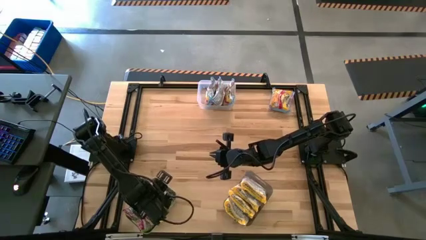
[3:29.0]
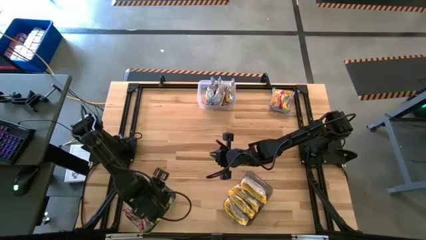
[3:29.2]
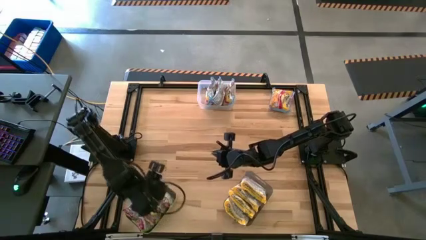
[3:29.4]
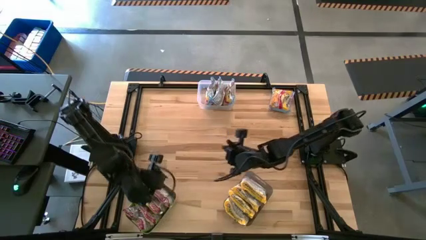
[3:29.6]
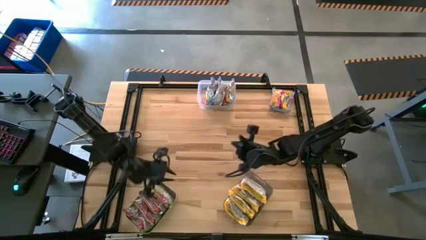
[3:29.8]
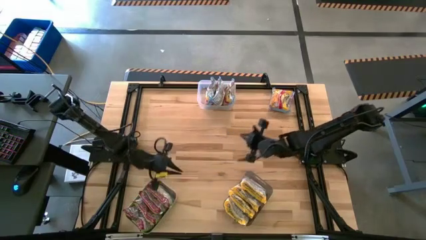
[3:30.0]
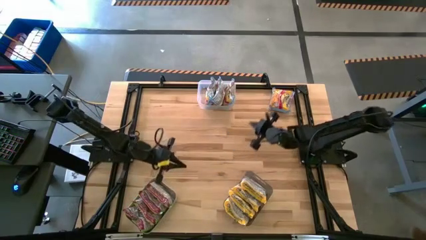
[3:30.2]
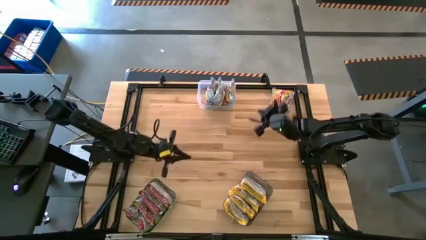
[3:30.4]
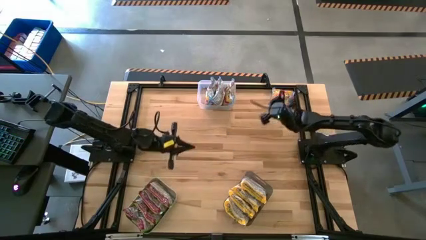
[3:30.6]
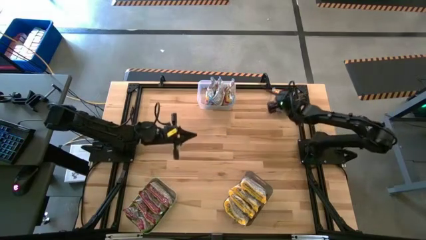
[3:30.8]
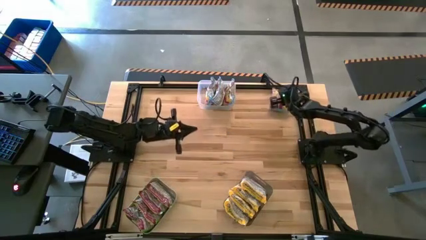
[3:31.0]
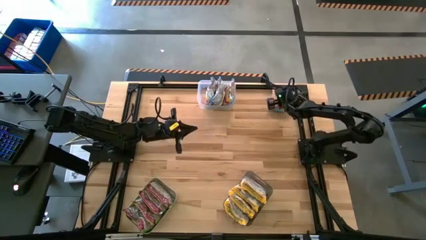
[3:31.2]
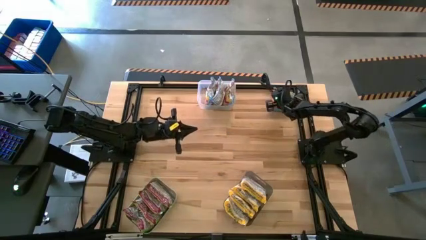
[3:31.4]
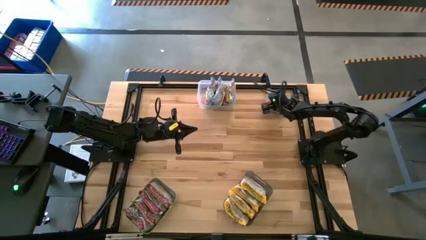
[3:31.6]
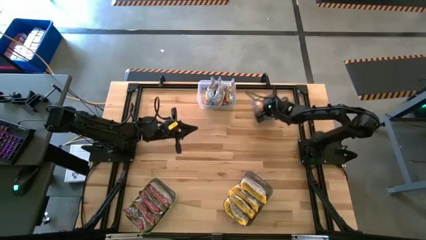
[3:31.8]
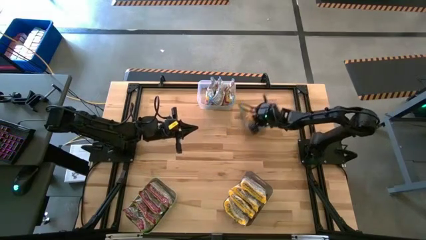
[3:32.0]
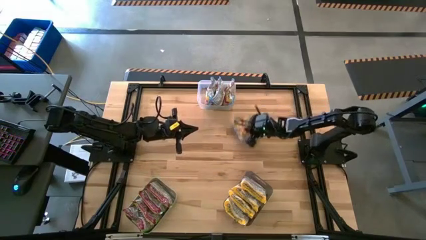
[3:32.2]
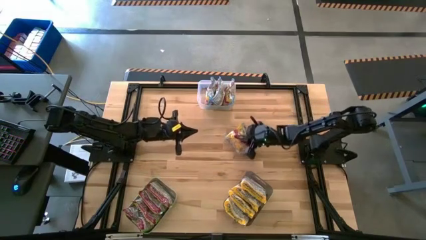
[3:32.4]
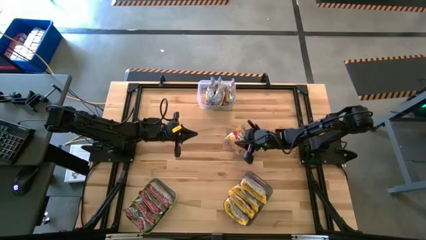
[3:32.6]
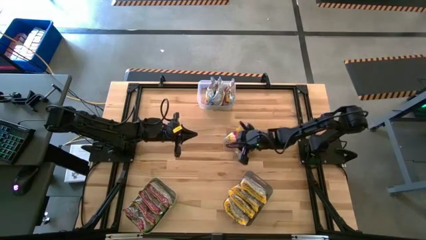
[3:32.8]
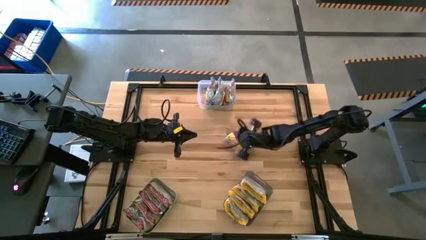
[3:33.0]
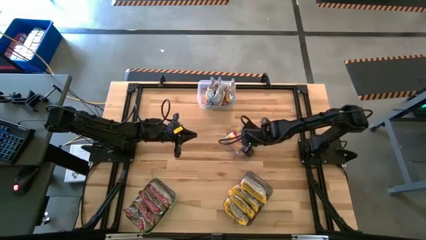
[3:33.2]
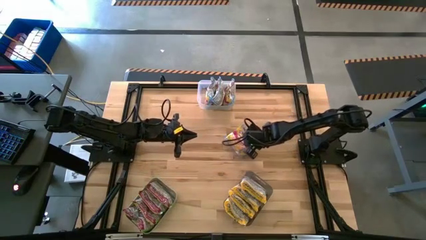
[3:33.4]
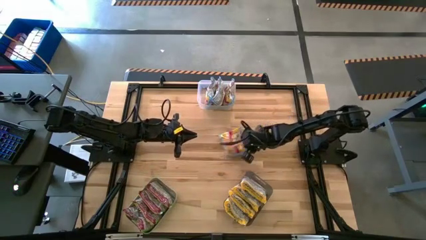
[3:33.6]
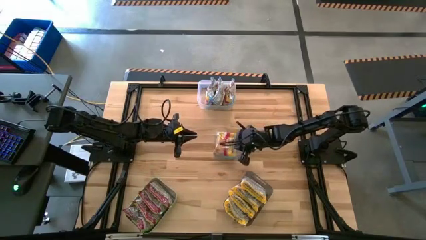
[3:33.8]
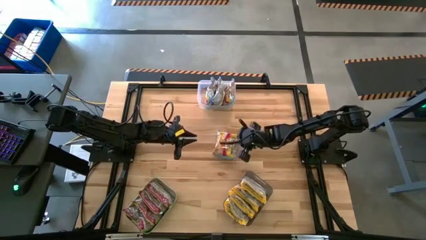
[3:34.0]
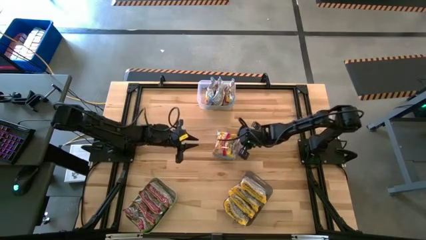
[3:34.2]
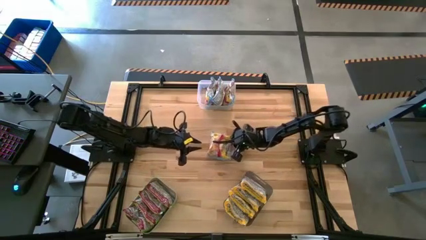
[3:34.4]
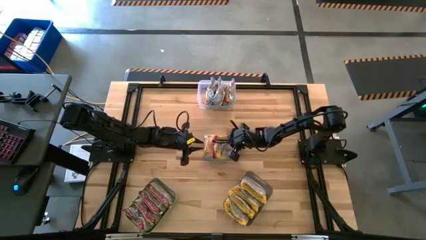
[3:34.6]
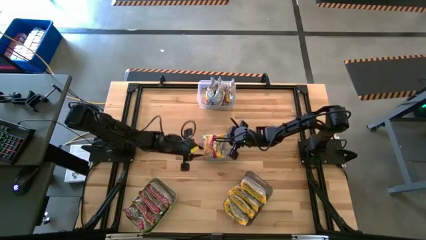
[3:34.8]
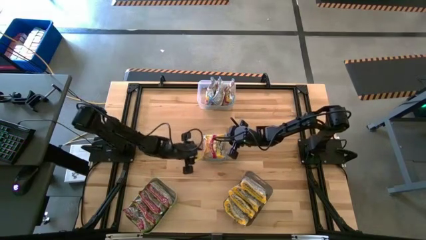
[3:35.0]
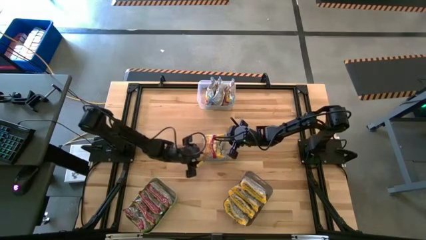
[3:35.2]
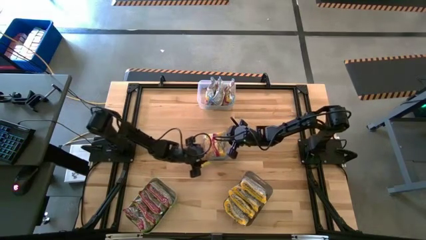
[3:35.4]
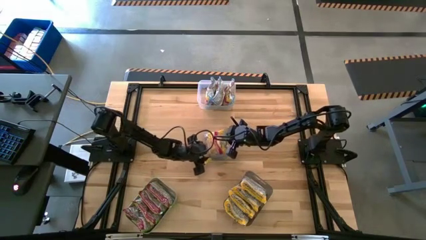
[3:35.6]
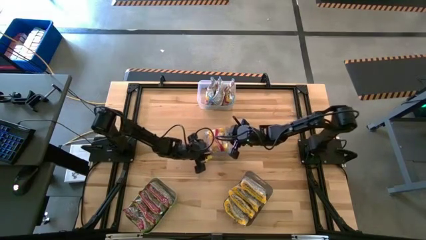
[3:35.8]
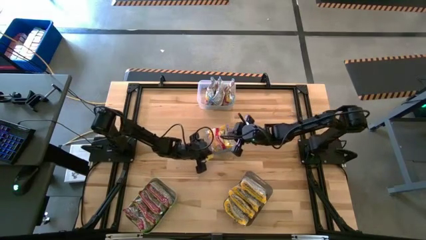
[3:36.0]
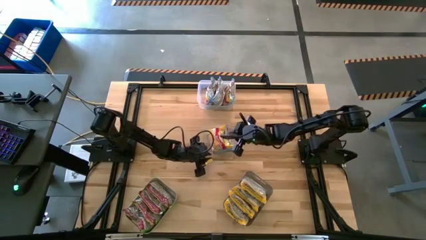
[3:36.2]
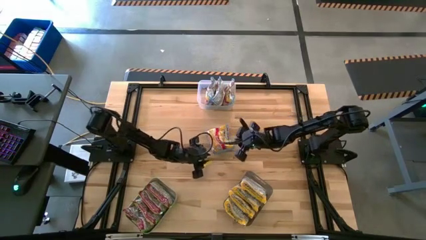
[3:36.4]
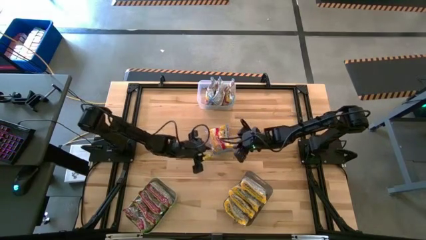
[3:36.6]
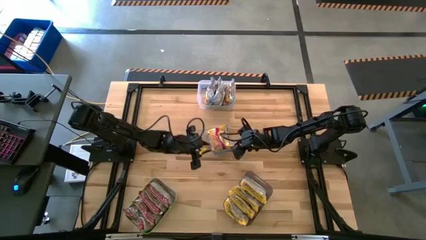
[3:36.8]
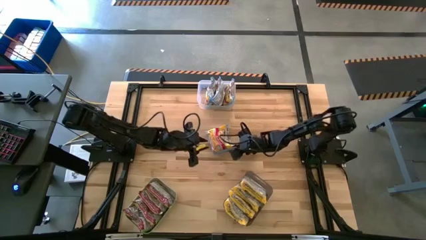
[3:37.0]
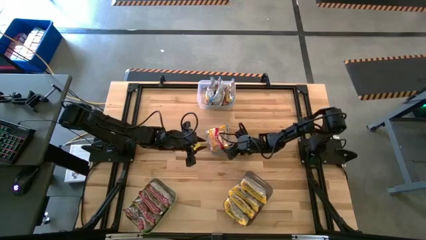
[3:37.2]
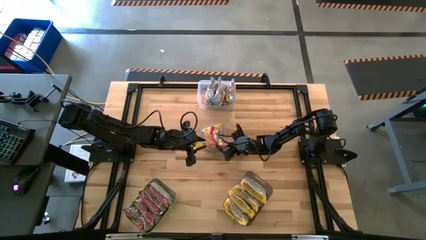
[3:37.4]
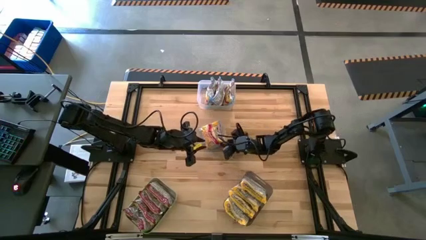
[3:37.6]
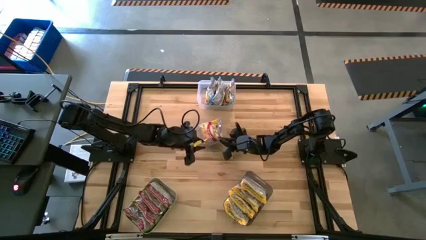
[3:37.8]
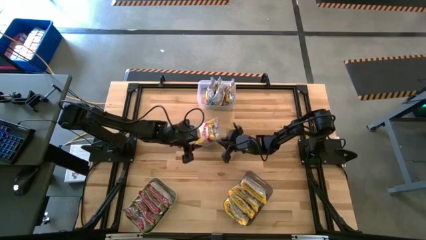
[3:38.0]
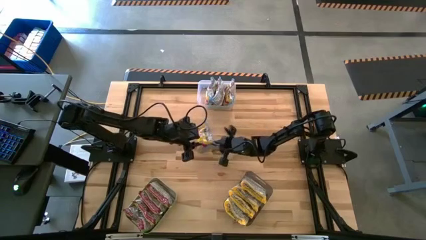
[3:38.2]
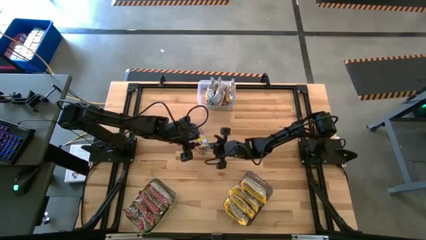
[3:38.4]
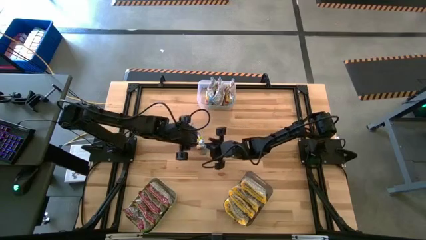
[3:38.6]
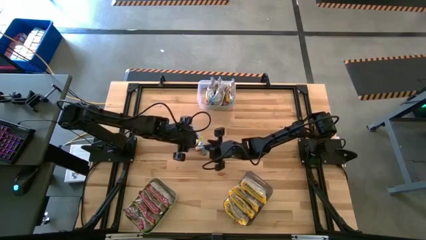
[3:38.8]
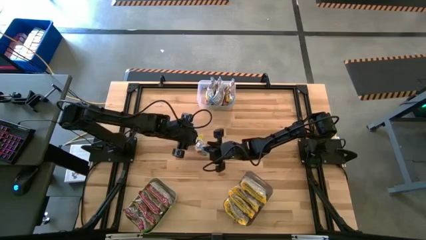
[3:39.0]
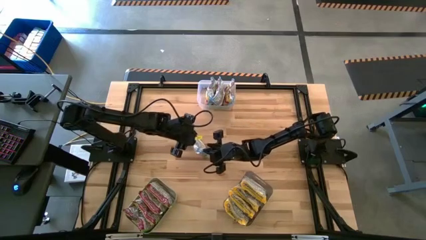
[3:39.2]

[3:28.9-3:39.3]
Task: Sort Maruchan noodles
Put the light blue noodle pack into the transparent bin

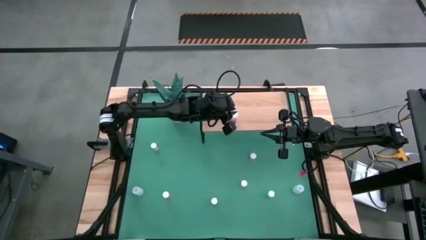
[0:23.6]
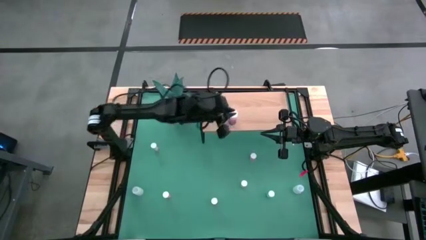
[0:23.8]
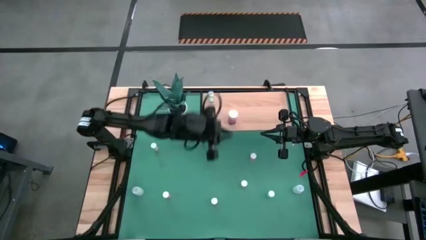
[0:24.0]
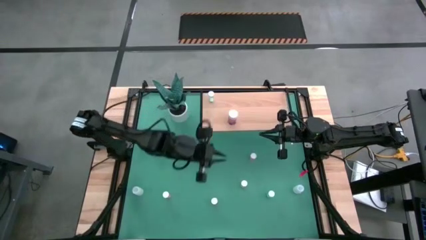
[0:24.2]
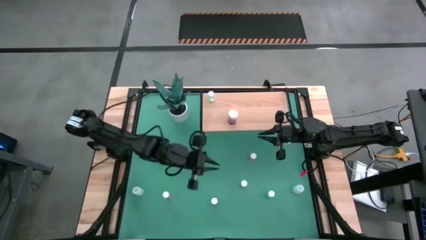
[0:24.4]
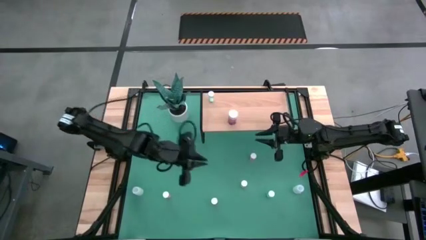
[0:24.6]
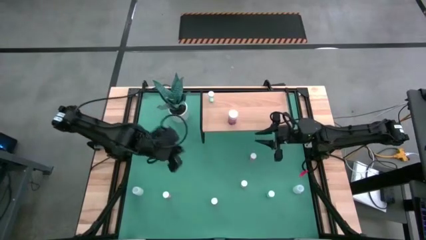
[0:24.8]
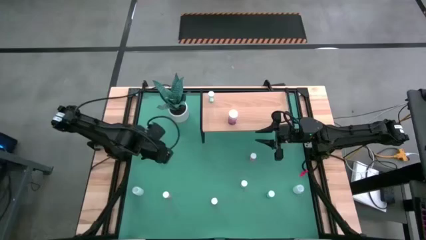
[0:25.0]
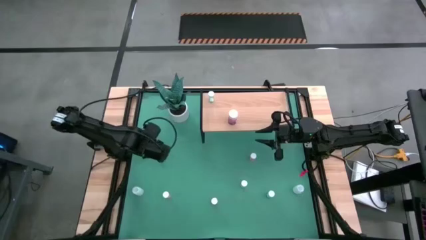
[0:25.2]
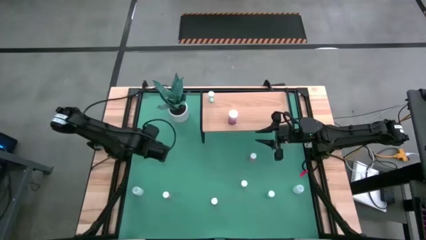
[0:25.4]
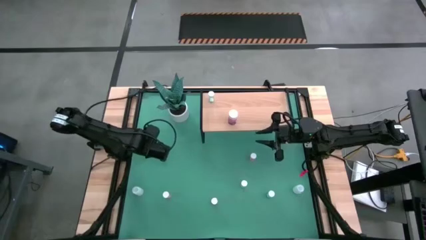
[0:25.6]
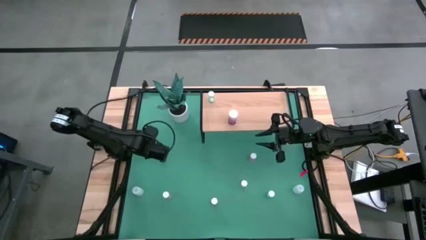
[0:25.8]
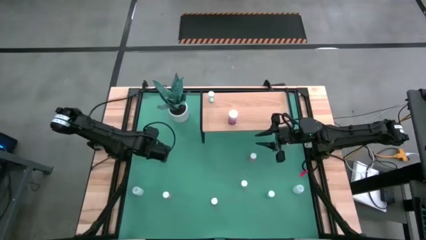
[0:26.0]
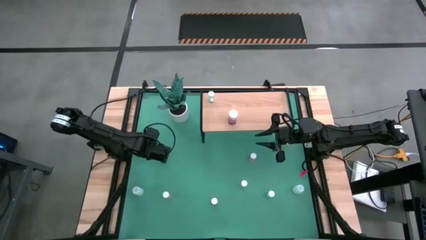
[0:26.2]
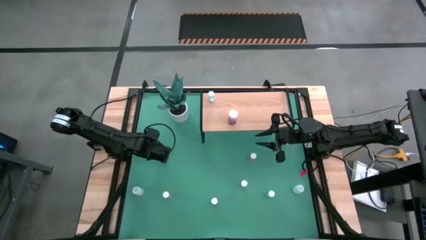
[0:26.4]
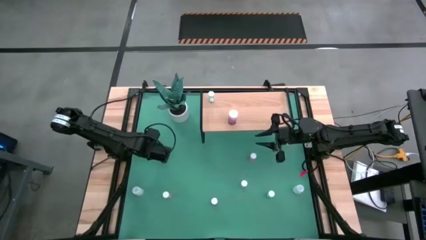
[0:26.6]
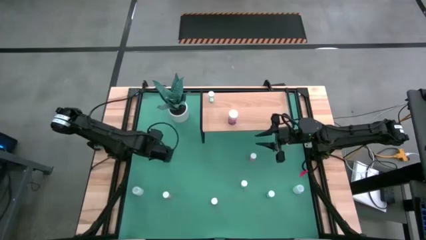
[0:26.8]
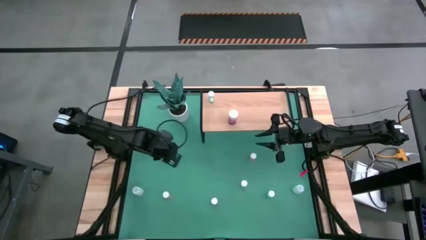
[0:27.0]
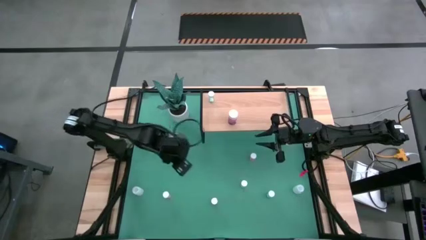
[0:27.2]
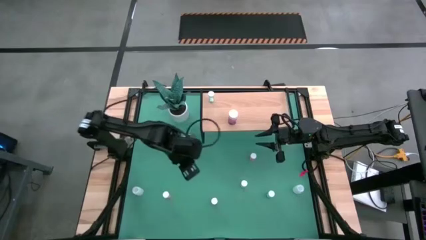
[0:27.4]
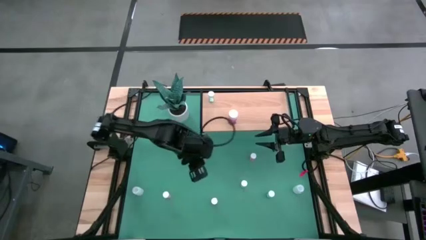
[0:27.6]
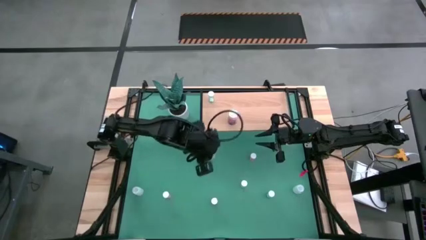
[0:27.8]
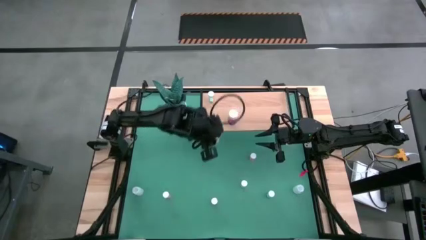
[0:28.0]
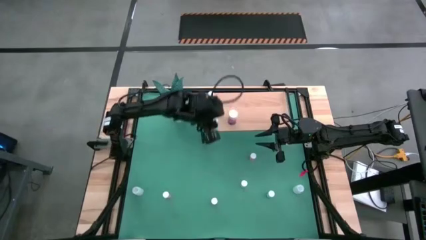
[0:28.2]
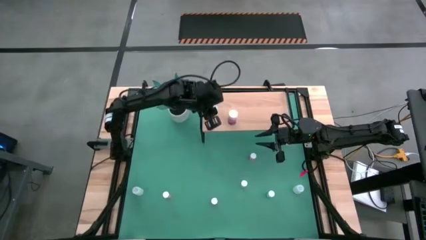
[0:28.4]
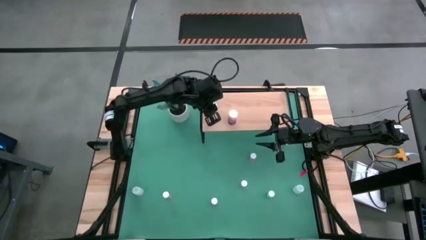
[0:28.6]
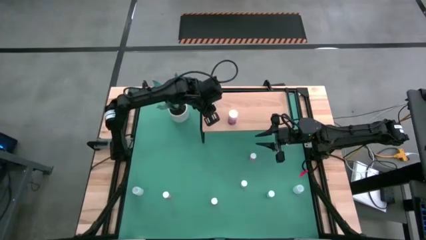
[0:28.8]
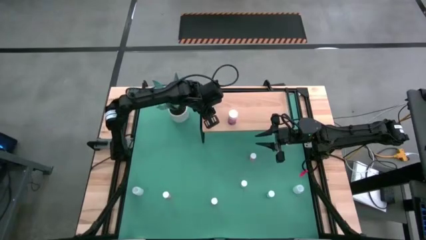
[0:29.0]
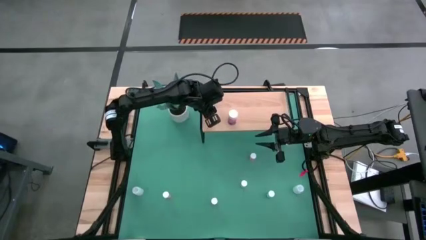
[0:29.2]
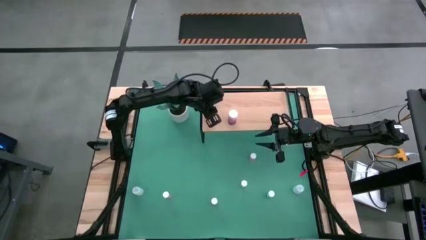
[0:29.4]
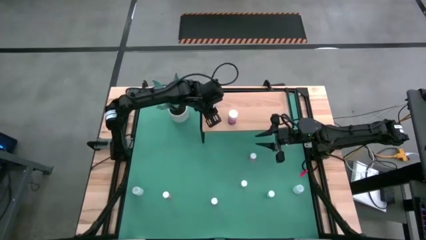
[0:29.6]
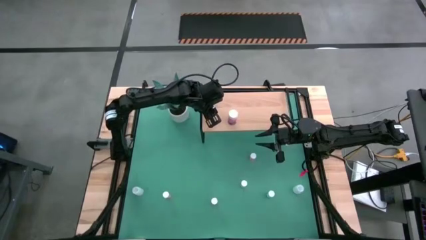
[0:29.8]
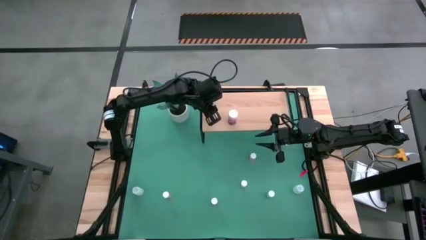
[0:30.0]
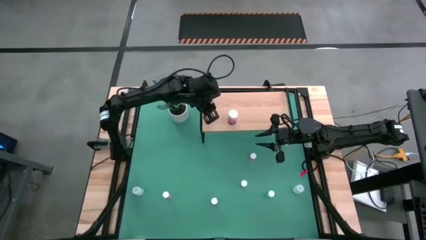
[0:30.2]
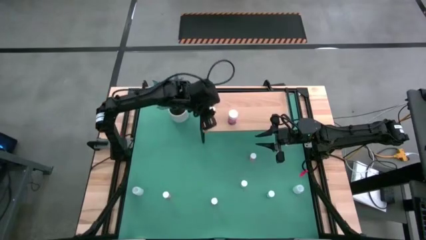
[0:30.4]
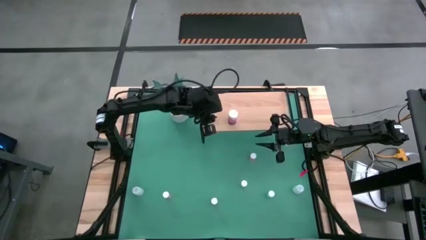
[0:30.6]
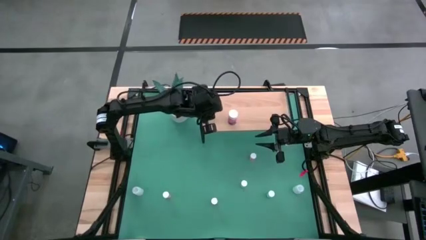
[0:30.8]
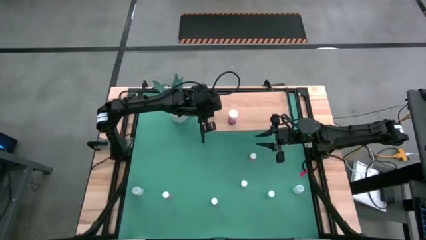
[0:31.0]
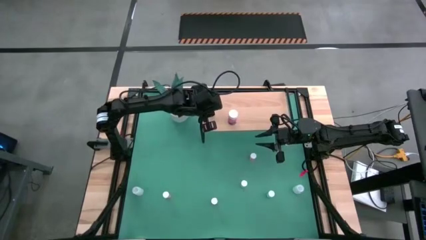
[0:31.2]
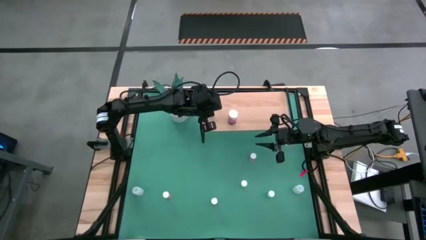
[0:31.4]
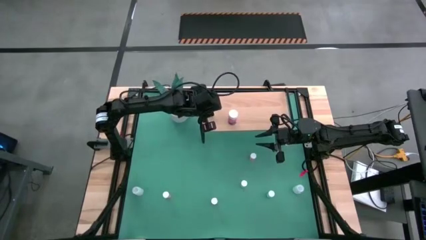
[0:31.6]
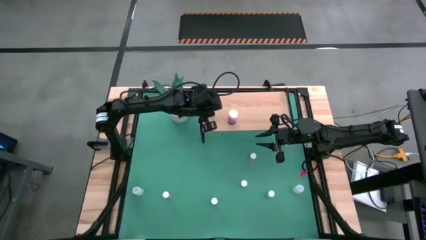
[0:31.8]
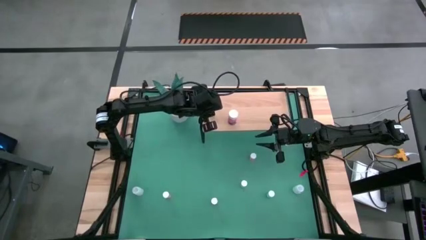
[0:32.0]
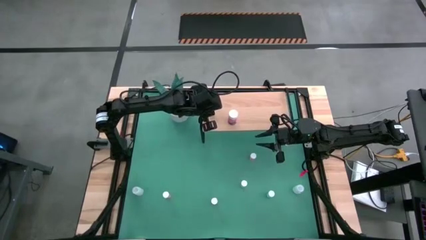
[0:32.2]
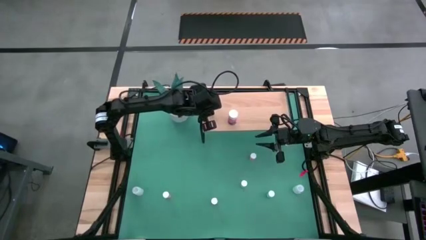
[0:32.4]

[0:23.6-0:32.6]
Task: Pick and place medicine bottles onto shelf by color
Put the top yellow pill bottle on the shelf
